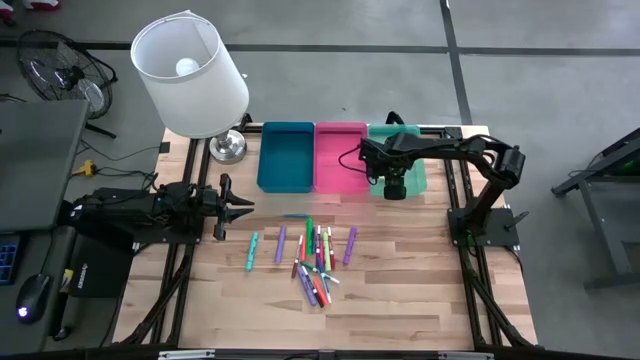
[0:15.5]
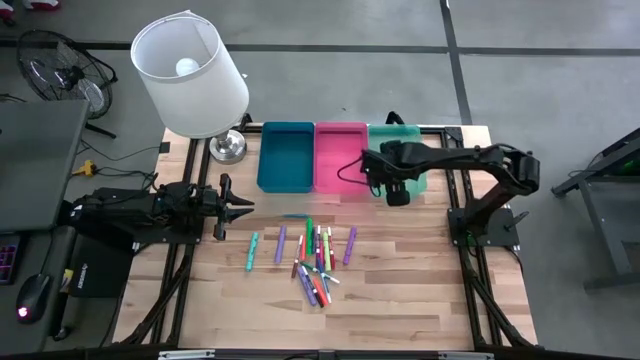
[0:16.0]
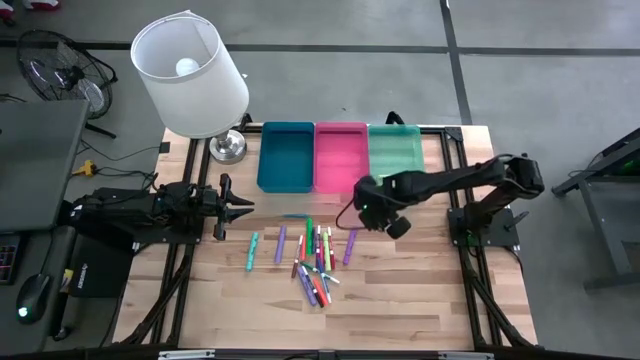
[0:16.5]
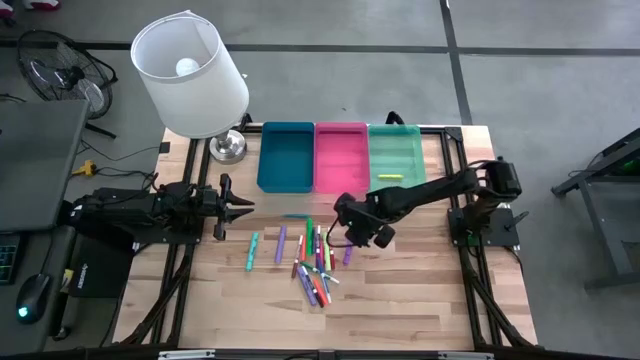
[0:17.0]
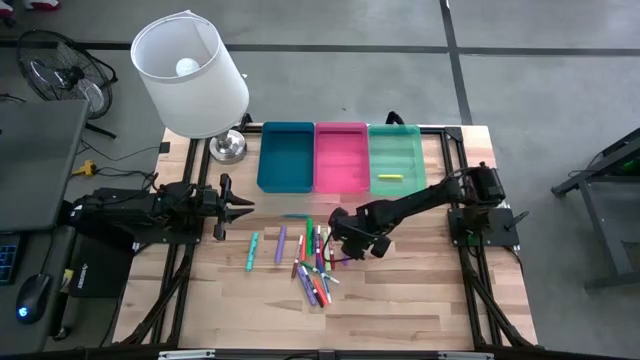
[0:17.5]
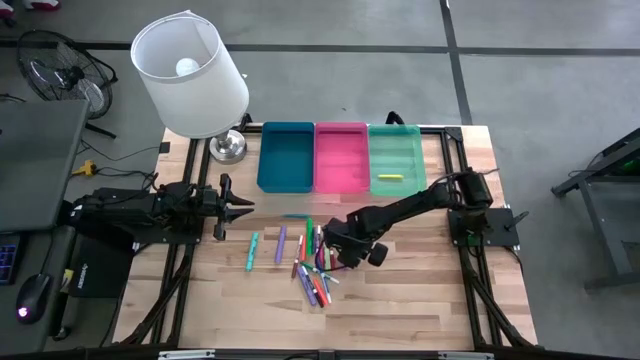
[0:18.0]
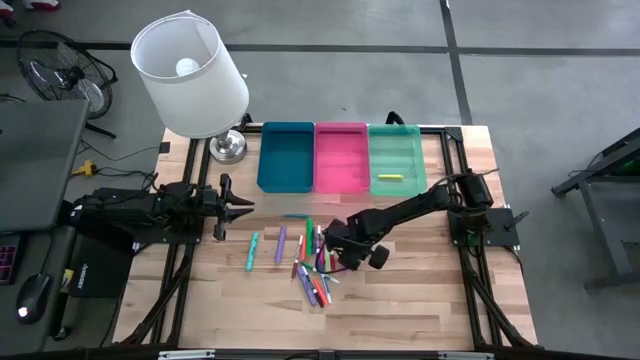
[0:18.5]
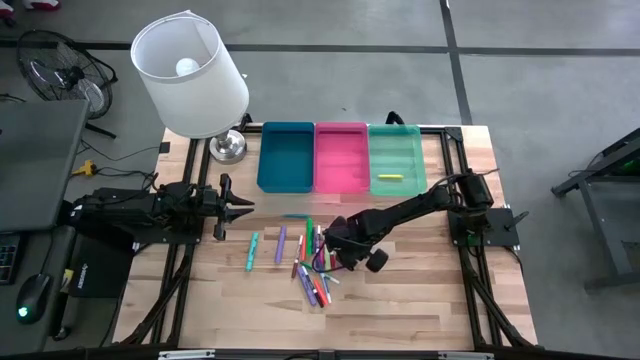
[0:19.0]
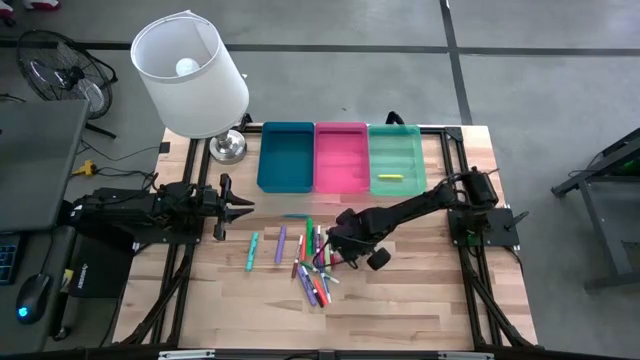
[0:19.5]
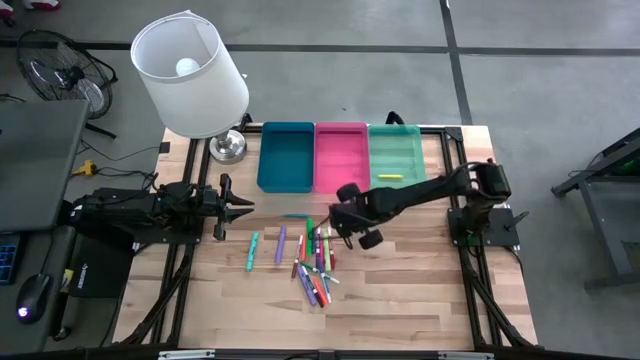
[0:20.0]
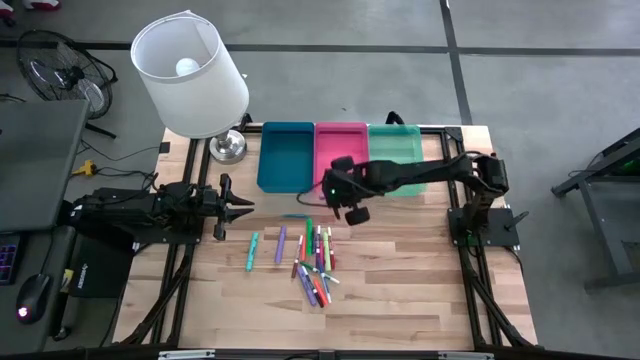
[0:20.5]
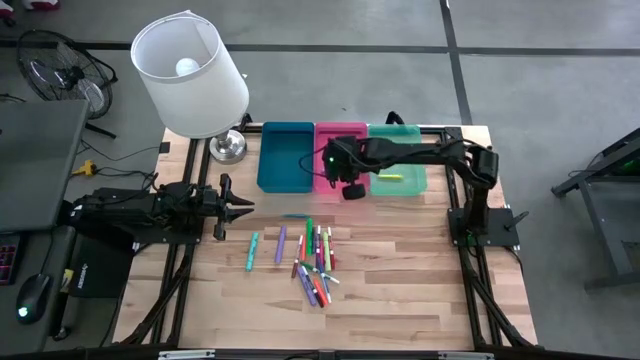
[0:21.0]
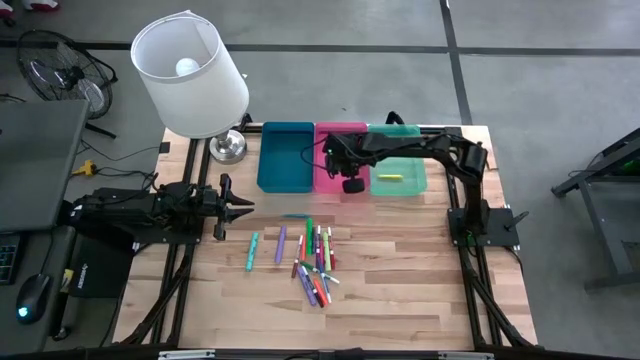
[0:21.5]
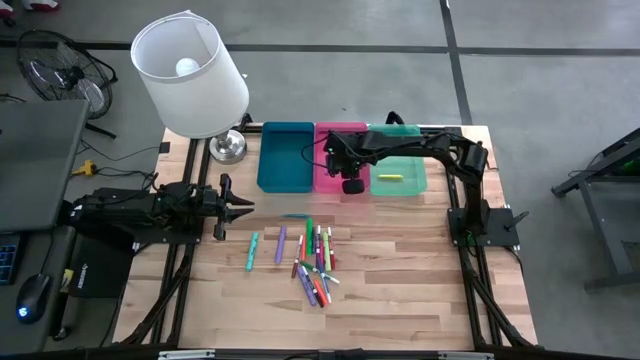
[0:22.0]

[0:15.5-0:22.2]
Task: Pick & Place Markers
Put the purple highlighter into the pink bin

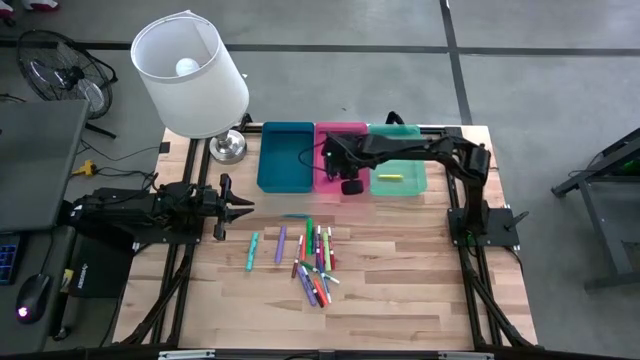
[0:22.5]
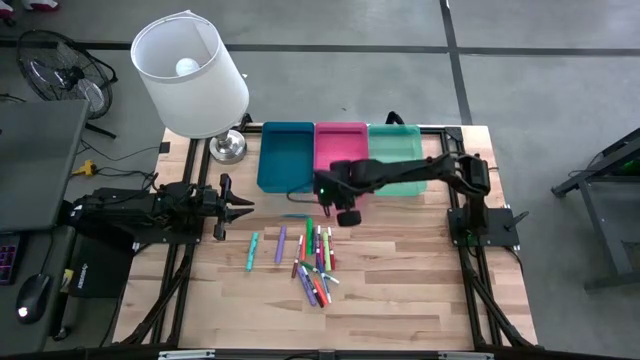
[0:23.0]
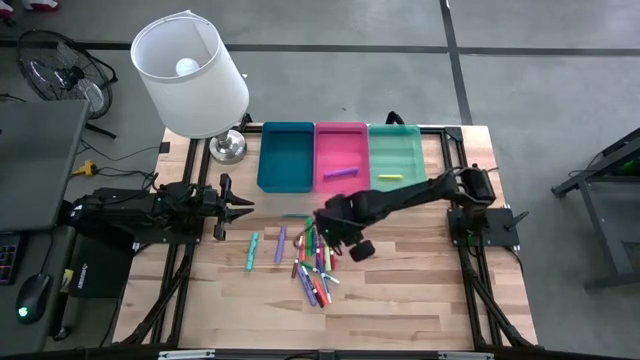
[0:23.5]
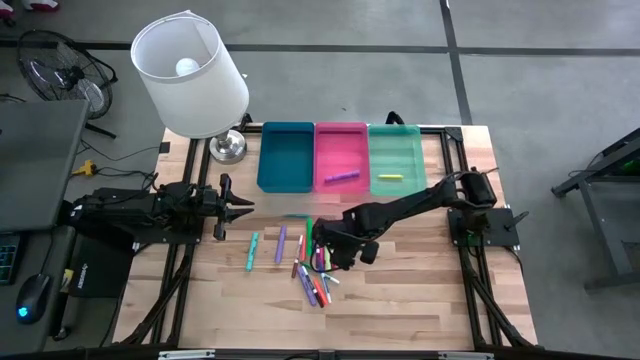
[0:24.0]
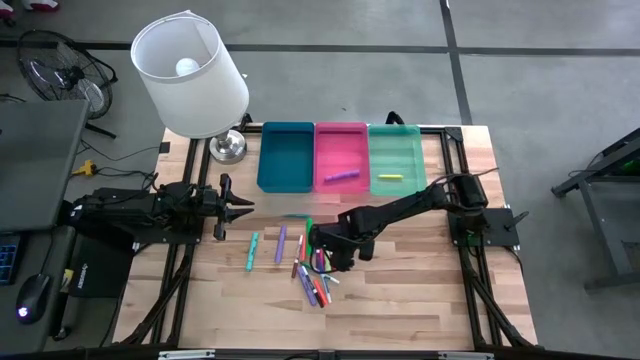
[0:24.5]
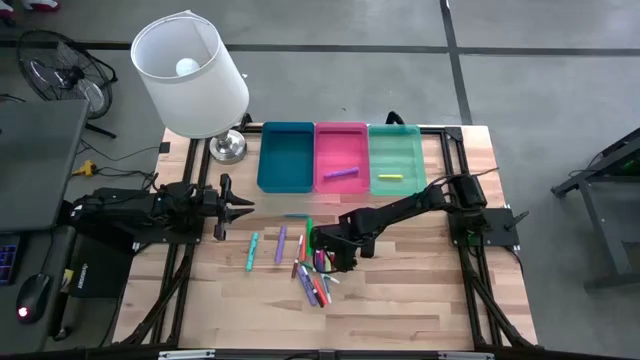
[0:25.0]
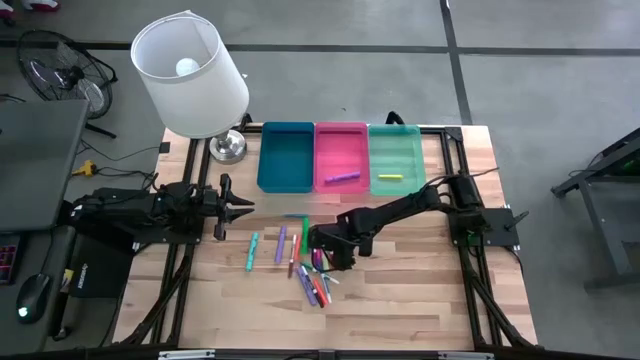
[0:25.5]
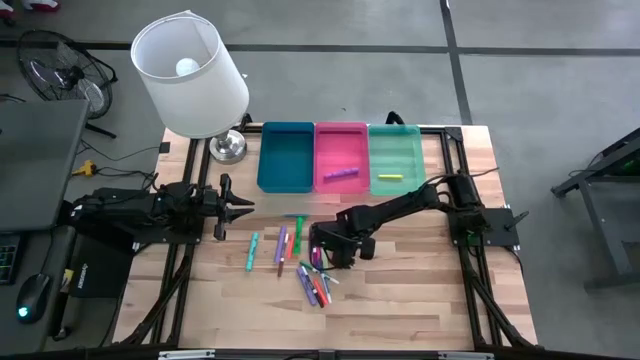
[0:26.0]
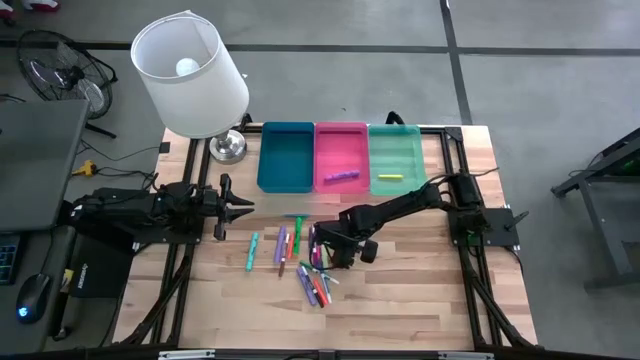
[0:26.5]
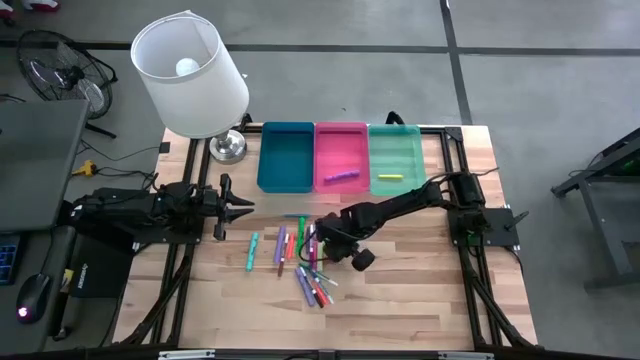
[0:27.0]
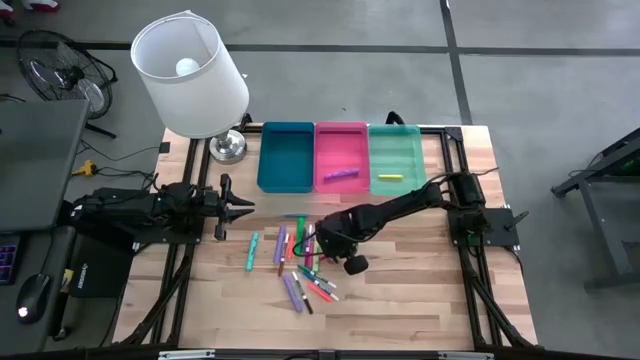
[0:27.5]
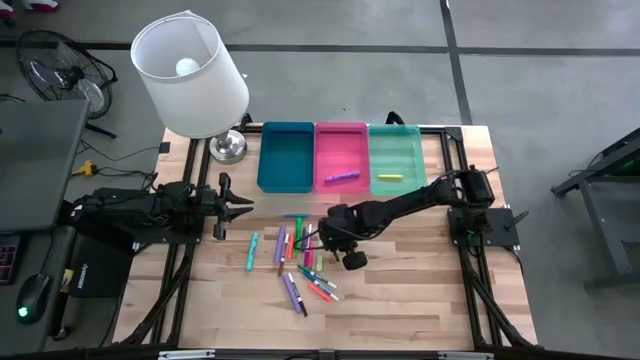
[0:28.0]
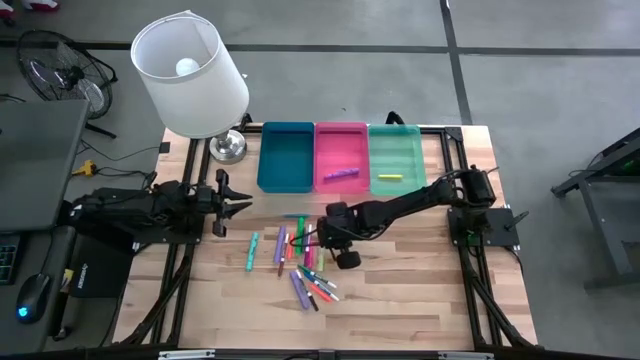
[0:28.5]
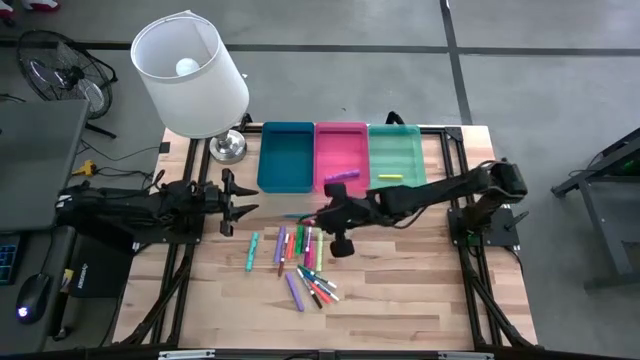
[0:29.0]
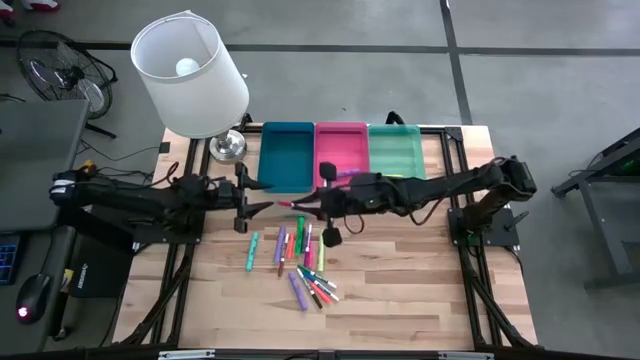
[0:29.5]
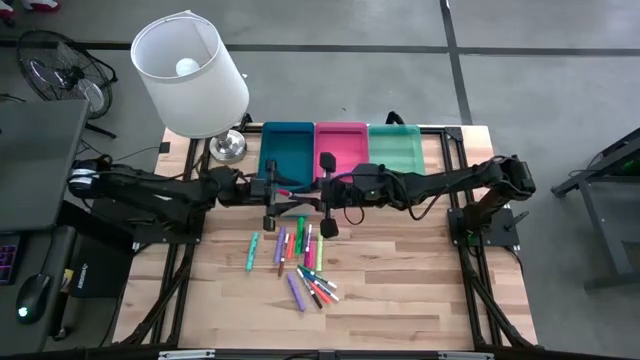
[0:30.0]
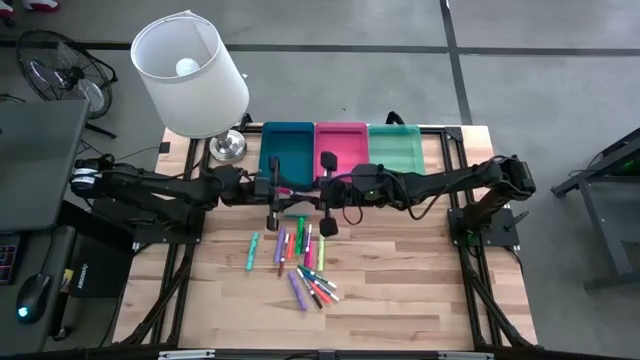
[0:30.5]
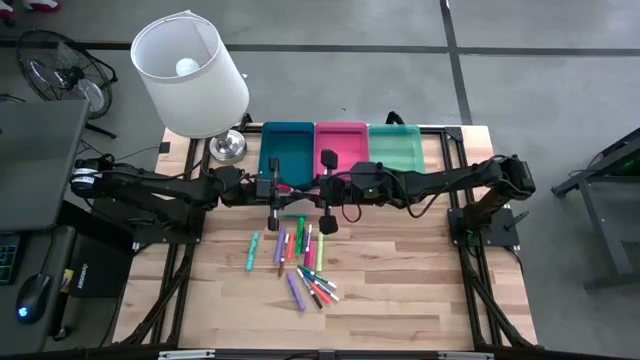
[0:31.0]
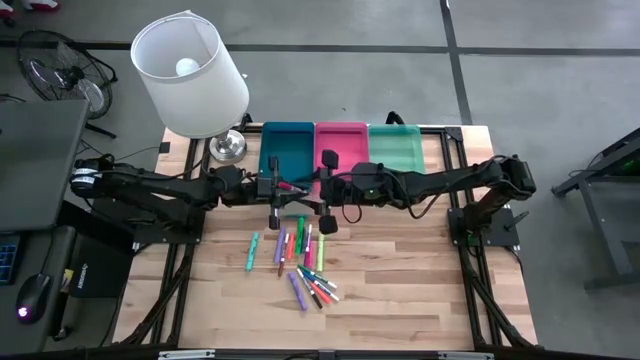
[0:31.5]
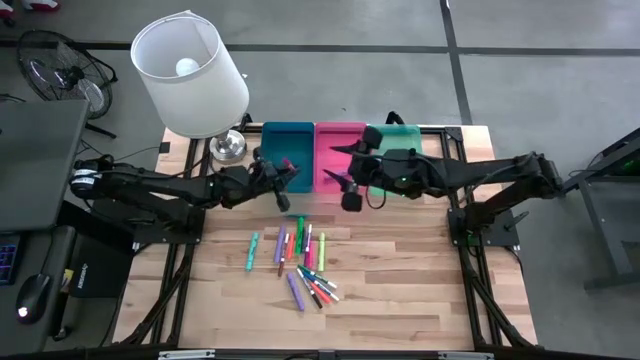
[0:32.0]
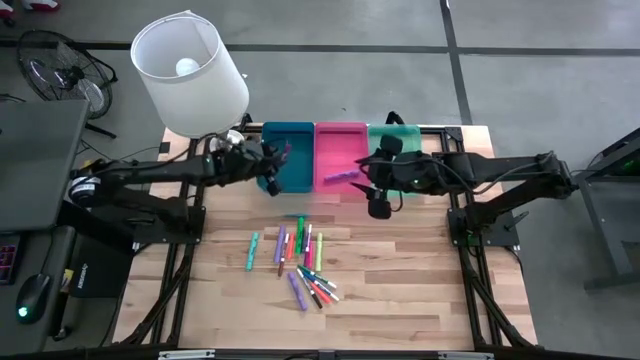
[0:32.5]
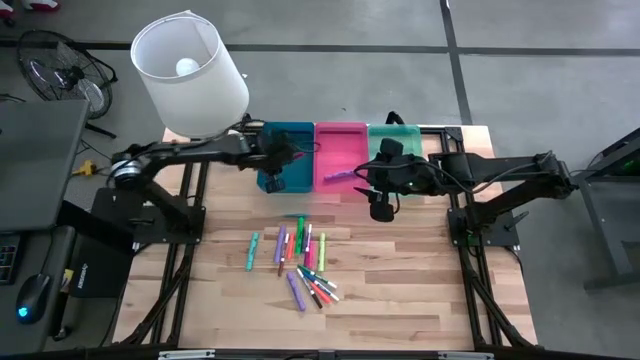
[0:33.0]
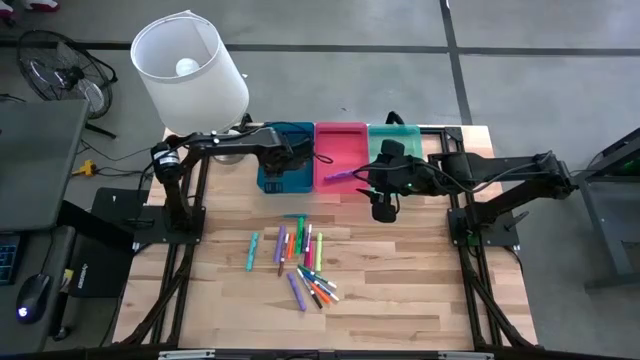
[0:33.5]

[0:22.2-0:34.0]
Put the red dry erase marker into the dark blue bin

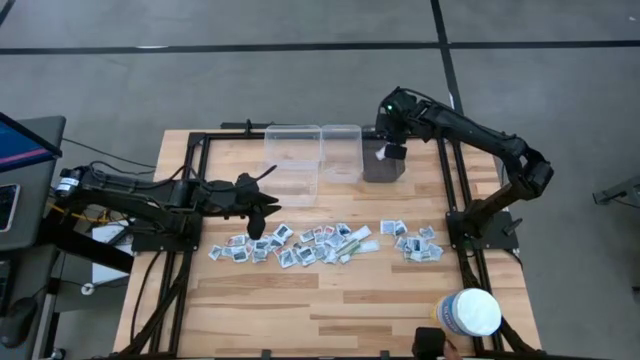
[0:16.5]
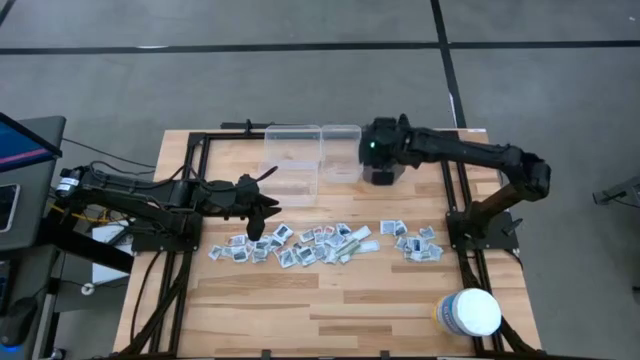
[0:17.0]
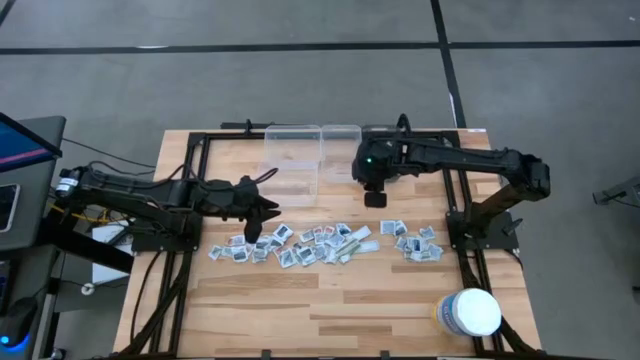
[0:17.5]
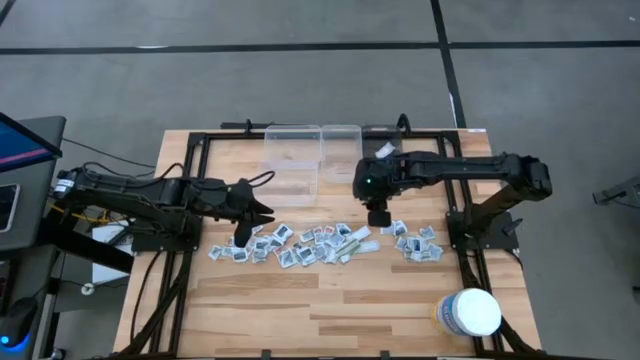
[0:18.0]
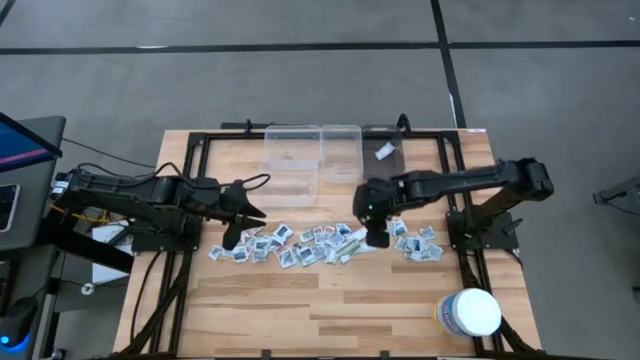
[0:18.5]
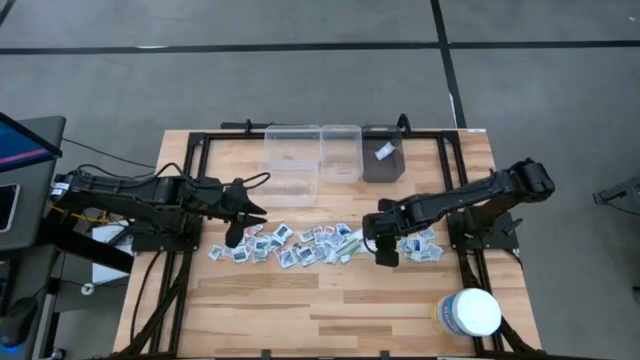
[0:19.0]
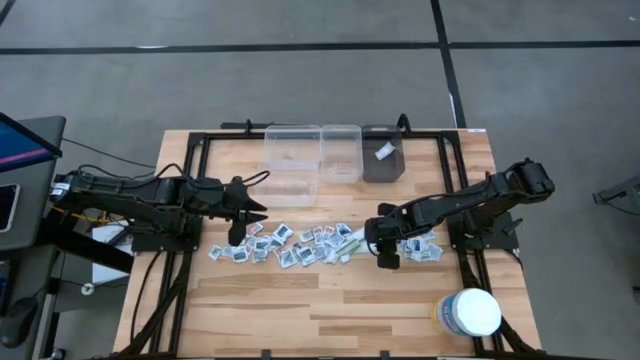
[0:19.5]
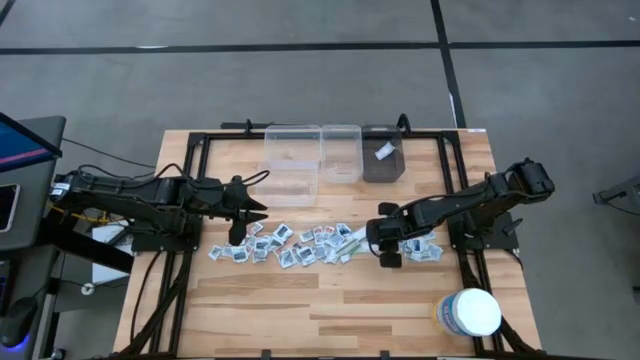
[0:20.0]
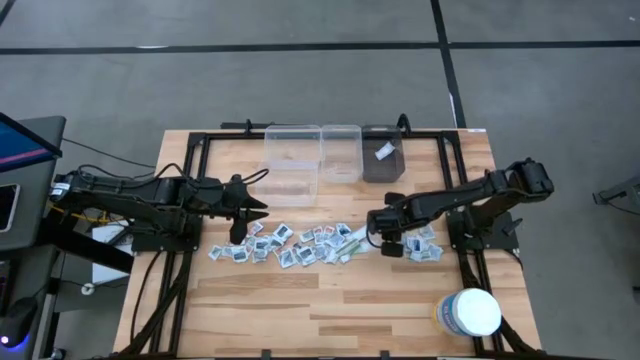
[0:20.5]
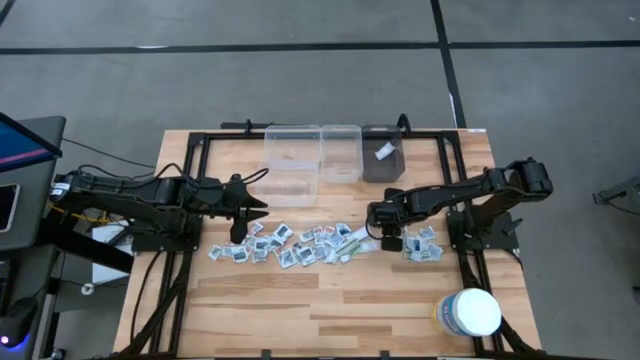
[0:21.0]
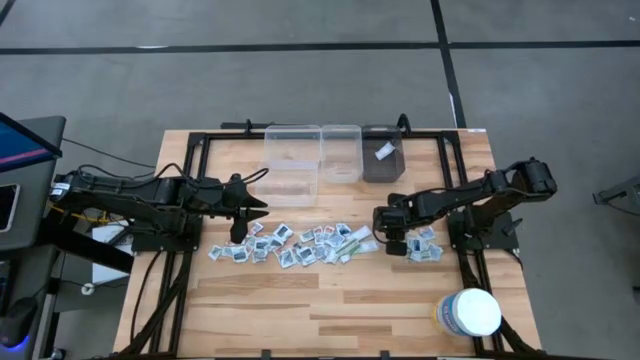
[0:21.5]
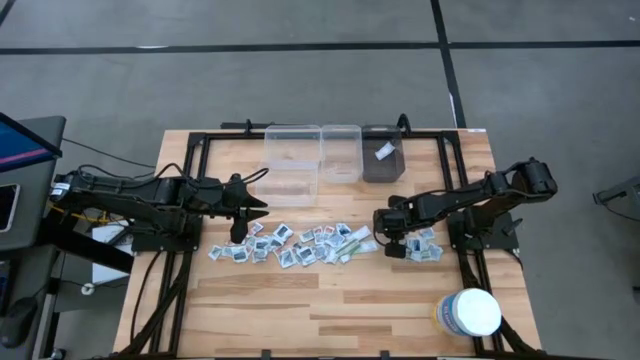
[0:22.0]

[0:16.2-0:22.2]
Task: Pick & Place First Aid Supplies
Put the alcohol pad into the top right transparent bin
